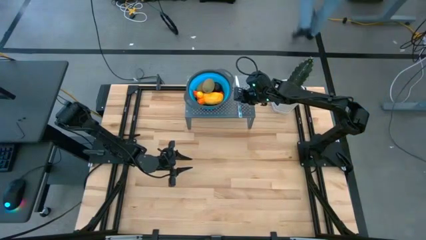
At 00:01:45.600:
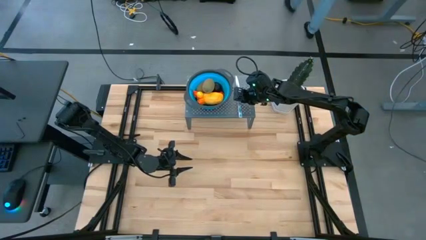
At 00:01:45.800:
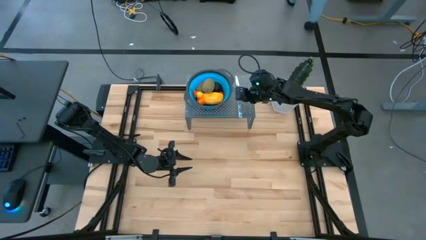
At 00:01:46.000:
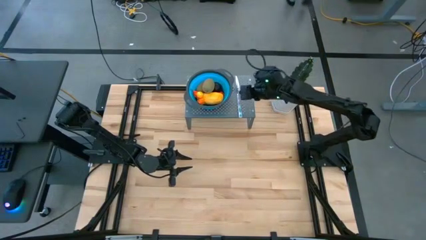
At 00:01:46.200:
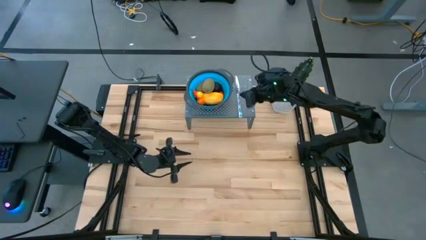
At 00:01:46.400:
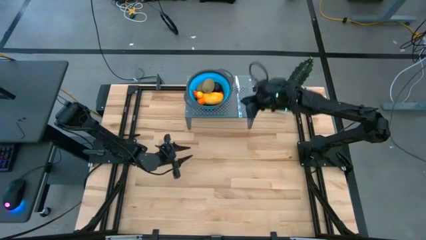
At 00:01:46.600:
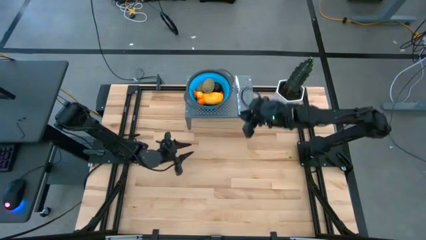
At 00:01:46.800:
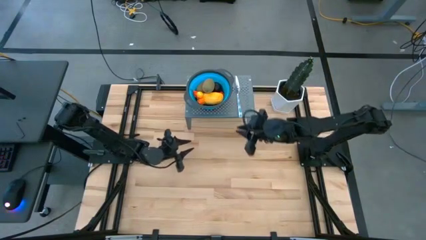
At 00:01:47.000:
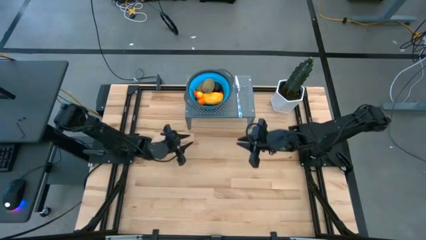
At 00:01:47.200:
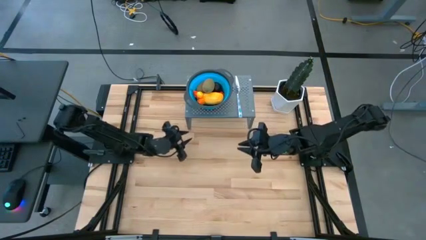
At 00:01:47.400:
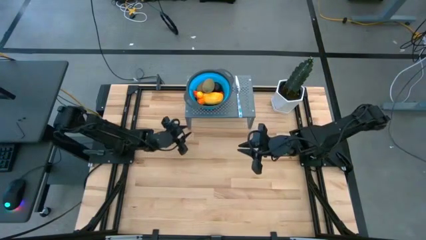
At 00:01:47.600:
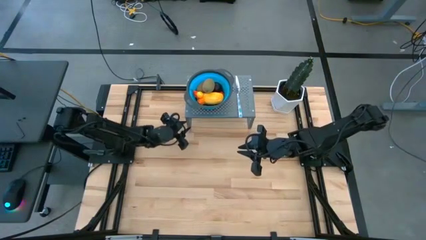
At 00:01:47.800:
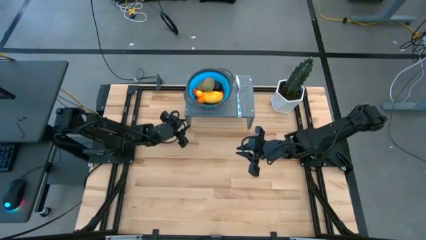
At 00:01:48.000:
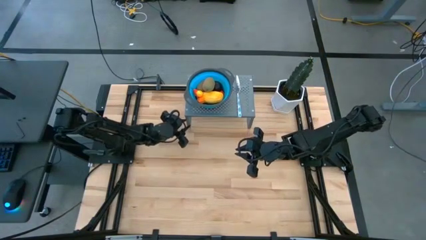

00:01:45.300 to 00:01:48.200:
Task: Pick & Place Fruit
Adjust the shelf

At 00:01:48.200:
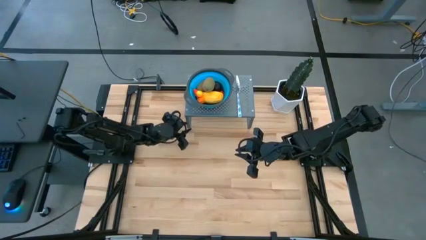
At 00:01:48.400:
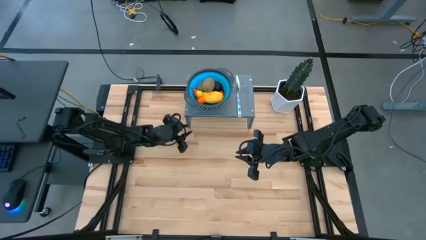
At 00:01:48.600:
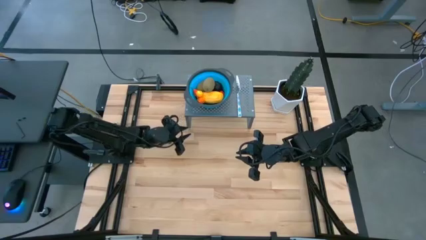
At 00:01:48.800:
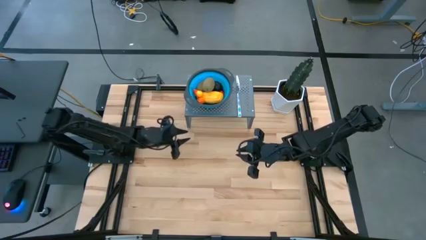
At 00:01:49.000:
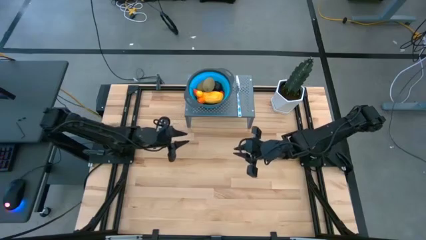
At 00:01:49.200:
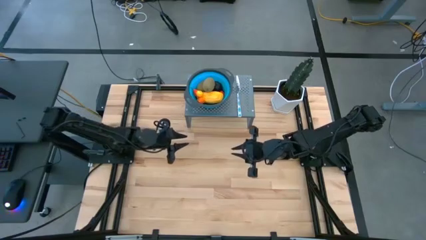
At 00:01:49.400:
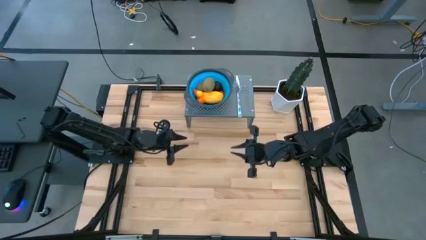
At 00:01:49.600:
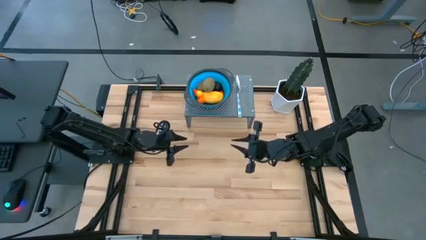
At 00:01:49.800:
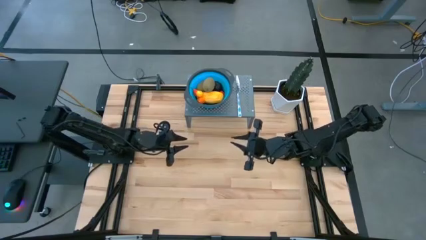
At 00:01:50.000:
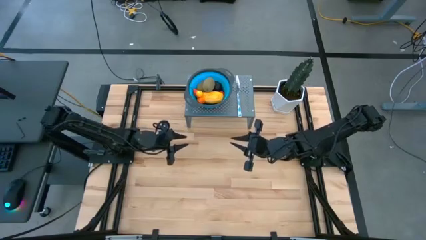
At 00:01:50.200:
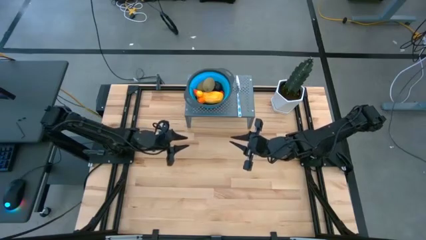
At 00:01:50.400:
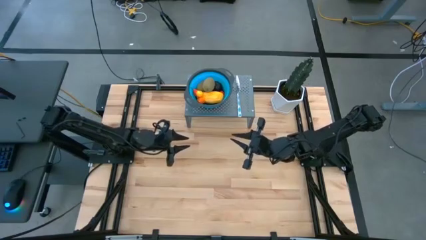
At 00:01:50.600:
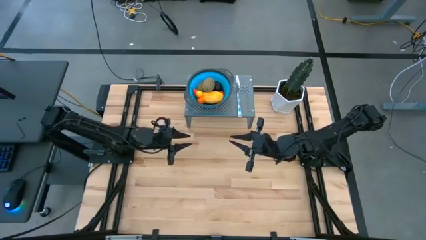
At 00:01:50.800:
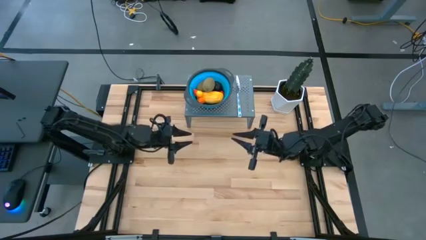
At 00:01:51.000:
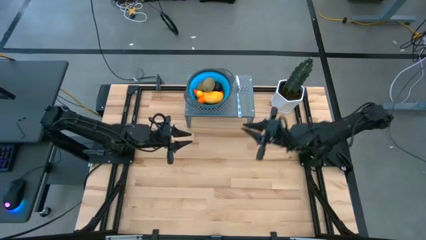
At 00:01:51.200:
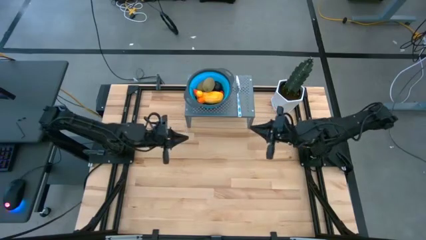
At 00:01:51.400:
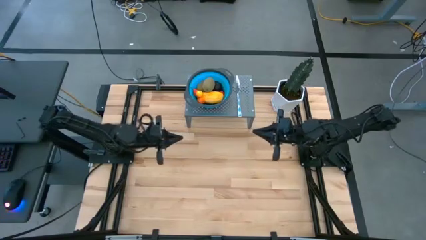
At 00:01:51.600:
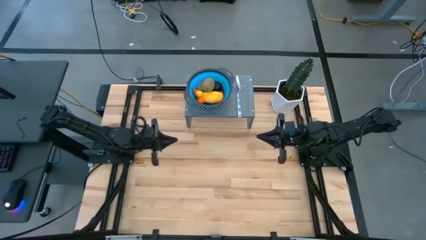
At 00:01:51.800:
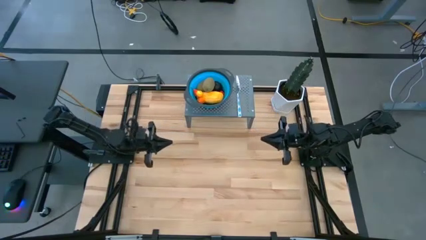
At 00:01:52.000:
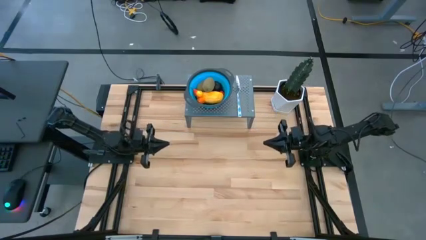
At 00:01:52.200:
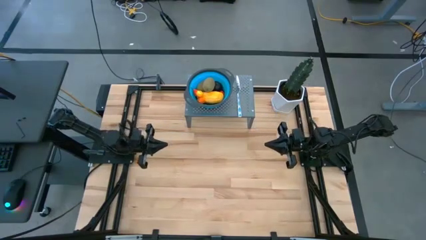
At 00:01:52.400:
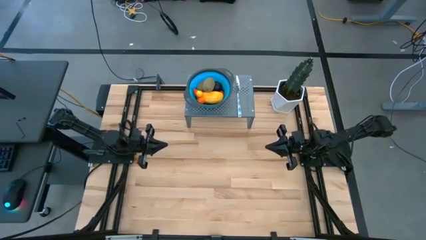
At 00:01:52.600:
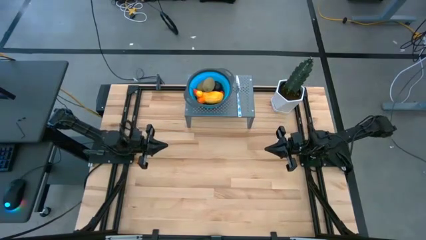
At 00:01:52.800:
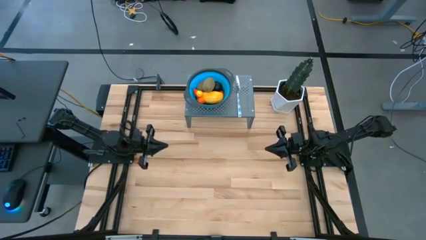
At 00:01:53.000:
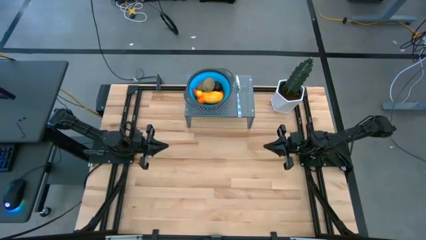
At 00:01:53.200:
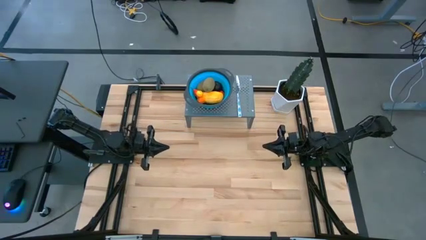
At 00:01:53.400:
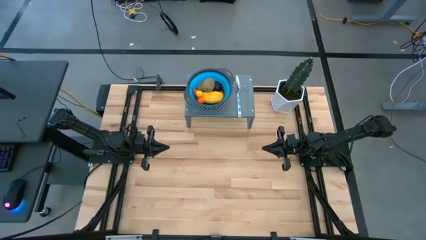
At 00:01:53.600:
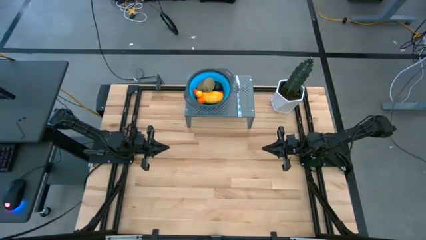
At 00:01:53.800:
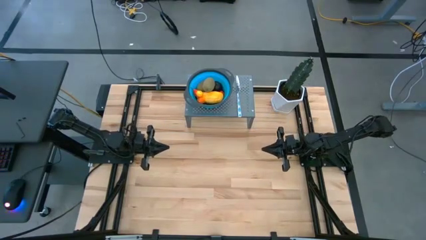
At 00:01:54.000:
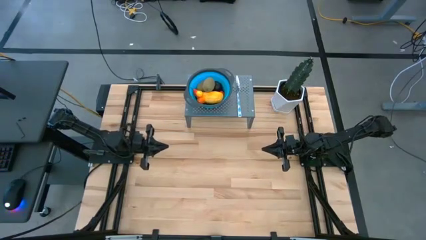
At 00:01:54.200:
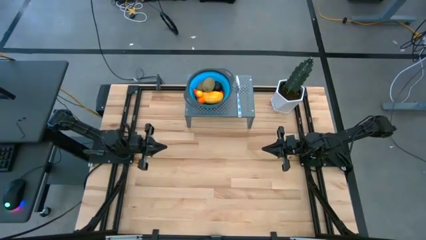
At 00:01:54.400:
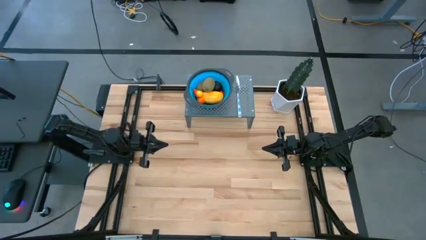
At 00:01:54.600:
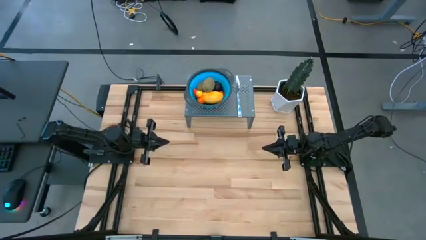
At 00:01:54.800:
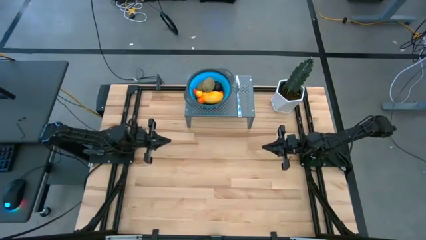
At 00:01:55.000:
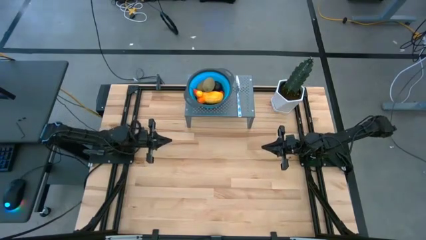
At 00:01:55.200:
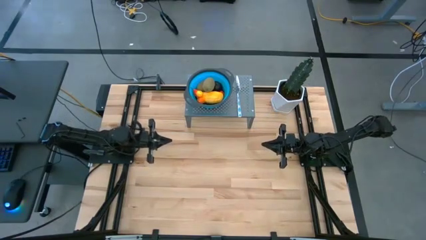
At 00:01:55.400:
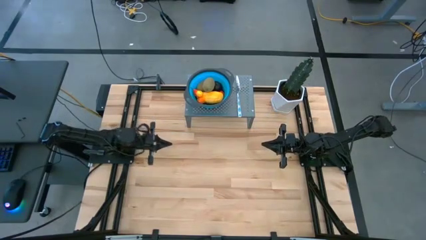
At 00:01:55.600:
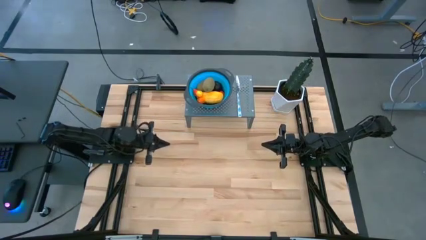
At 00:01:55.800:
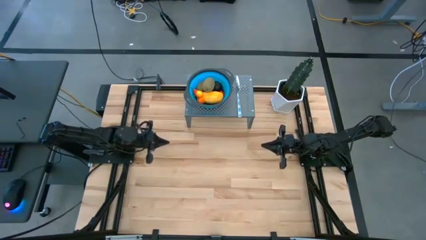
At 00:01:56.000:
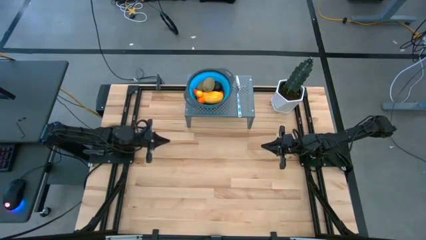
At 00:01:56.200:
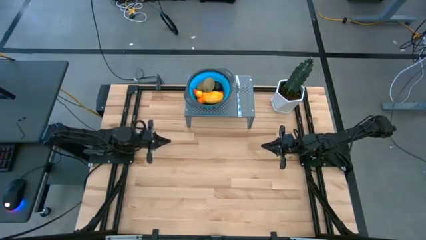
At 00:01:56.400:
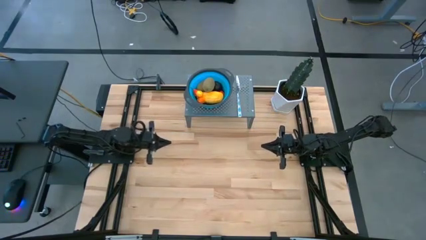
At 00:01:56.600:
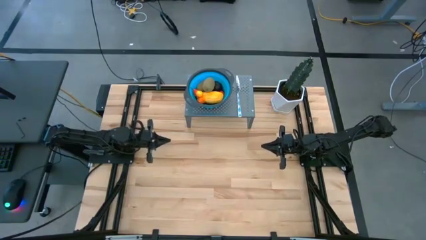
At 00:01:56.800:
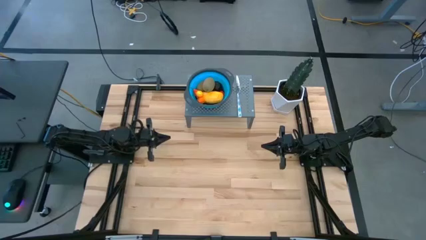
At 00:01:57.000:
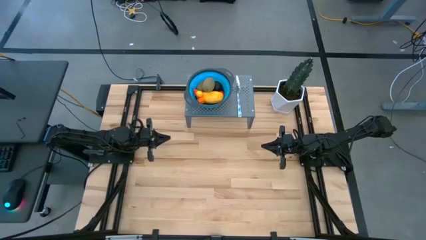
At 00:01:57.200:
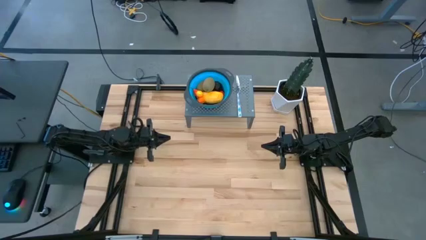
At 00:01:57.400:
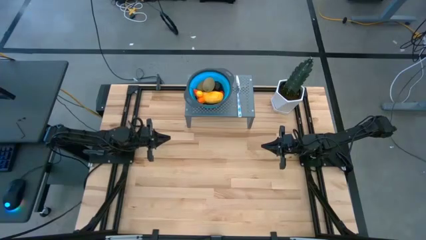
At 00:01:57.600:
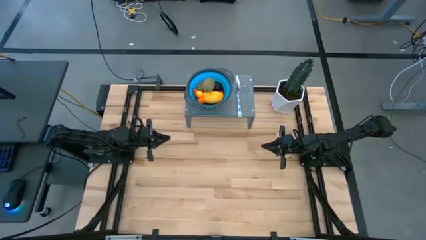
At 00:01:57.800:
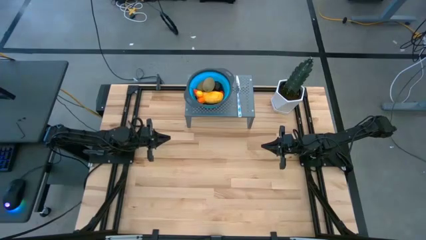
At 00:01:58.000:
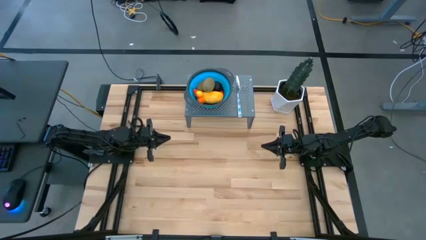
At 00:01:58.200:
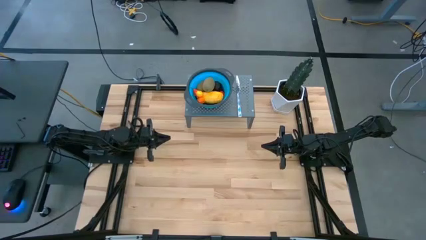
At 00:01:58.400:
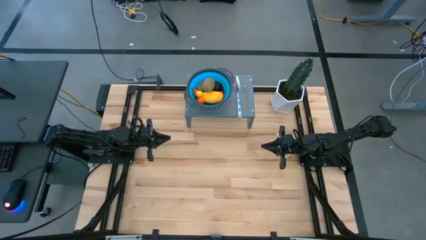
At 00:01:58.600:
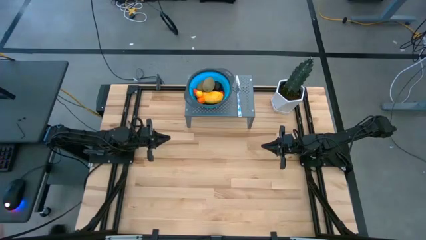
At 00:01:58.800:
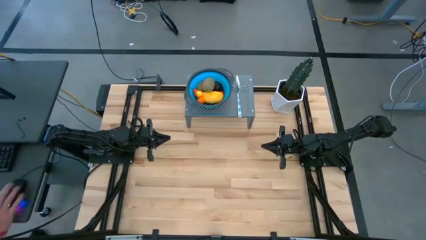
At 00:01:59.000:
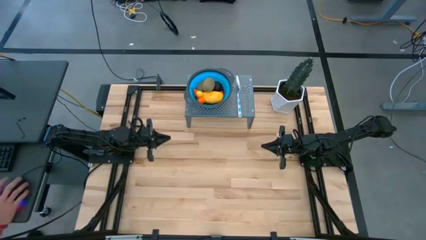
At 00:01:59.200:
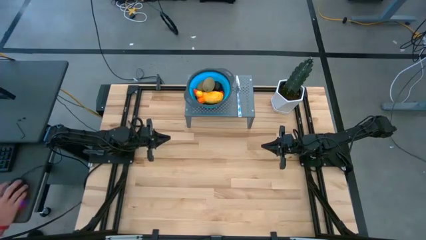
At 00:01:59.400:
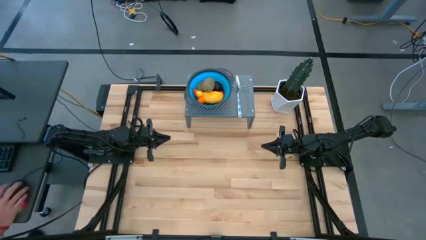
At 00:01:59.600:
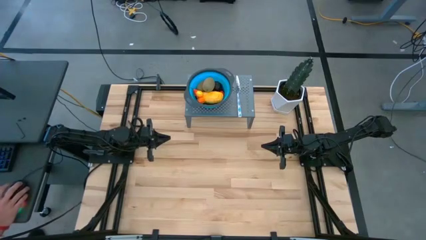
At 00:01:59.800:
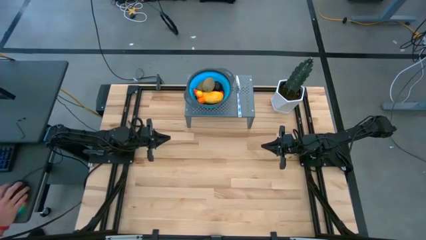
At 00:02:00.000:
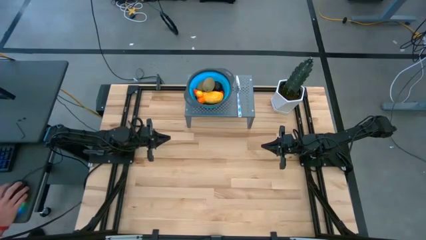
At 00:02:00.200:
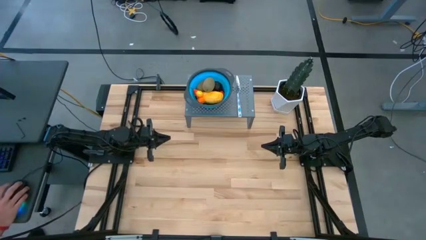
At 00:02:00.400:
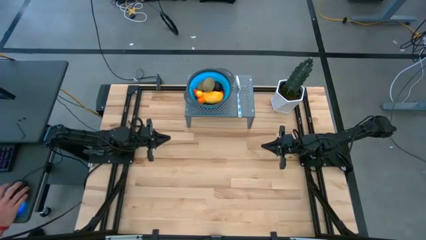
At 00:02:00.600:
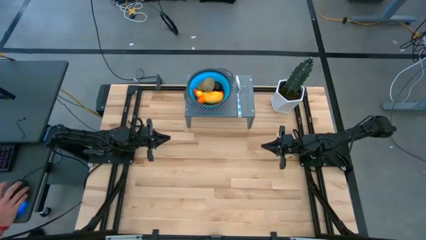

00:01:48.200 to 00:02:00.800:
Return to Home Position

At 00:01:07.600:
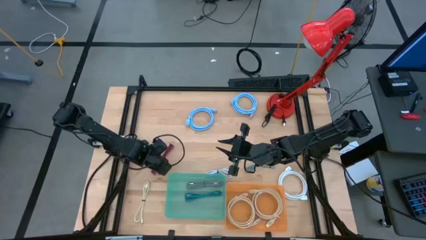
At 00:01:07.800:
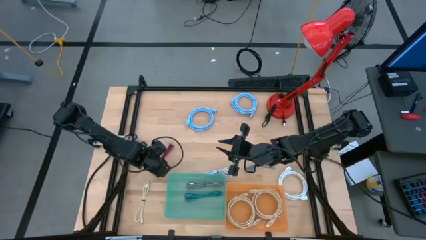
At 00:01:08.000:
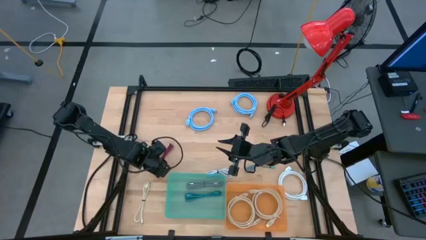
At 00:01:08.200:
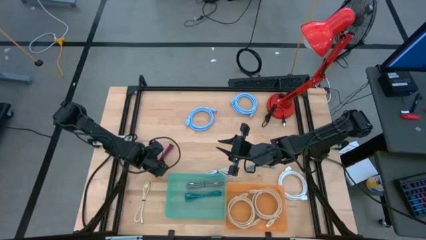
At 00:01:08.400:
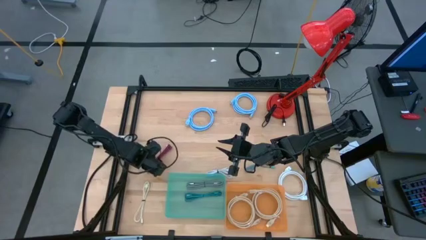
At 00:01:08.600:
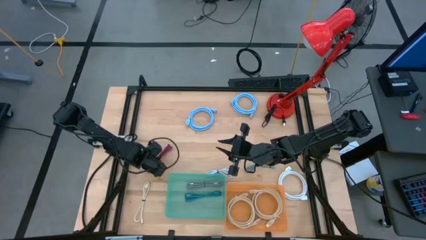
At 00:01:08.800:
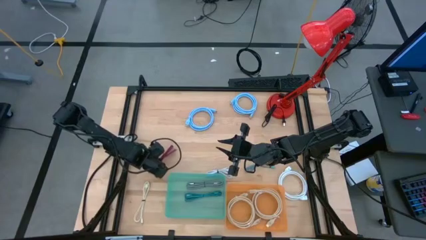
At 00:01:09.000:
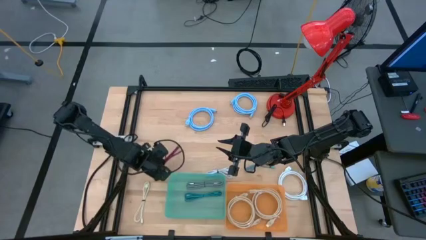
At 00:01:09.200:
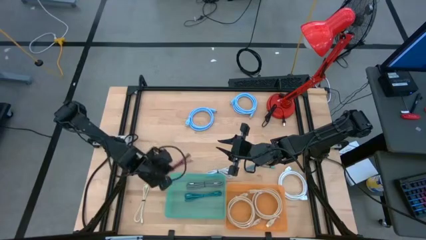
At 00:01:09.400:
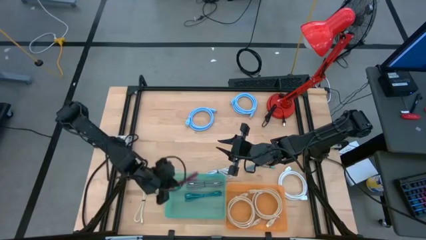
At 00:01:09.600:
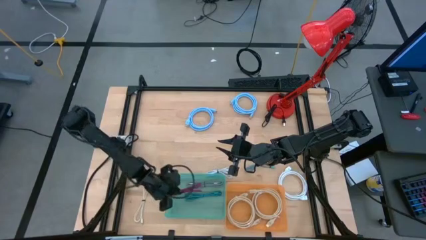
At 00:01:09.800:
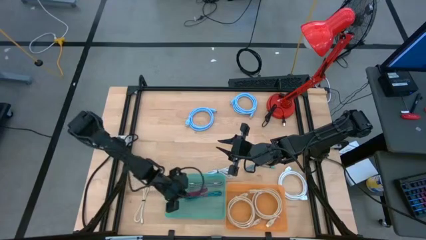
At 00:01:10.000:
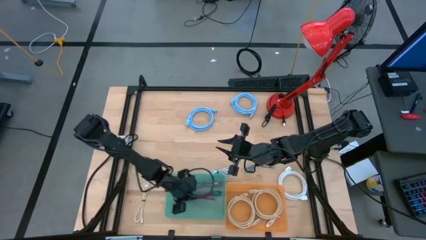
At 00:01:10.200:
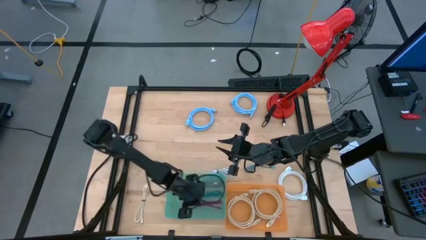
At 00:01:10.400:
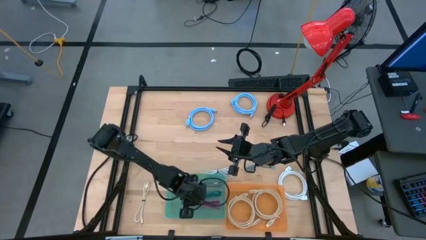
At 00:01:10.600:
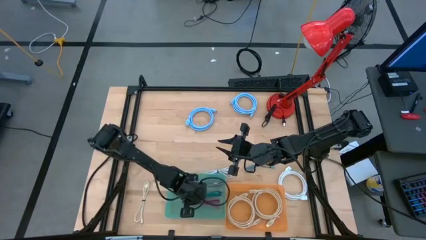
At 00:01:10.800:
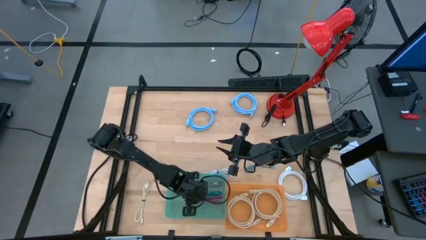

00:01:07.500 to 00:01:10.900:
Task: Pick & Place USB Port
Put the pink charger cable into the green bin
